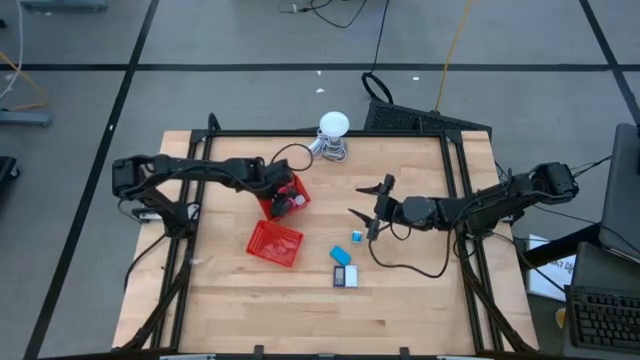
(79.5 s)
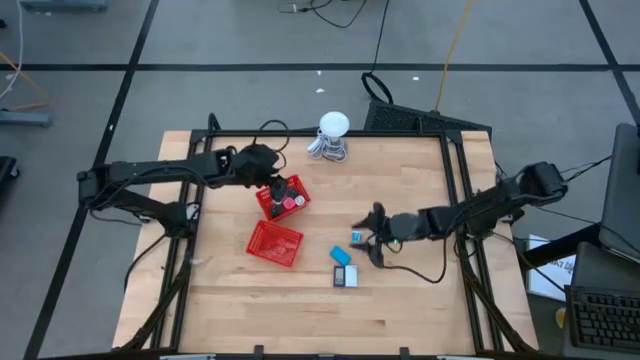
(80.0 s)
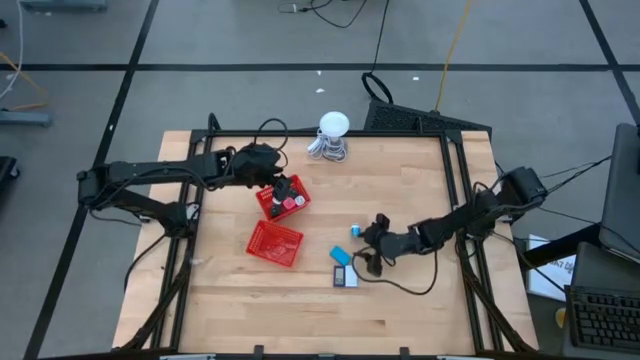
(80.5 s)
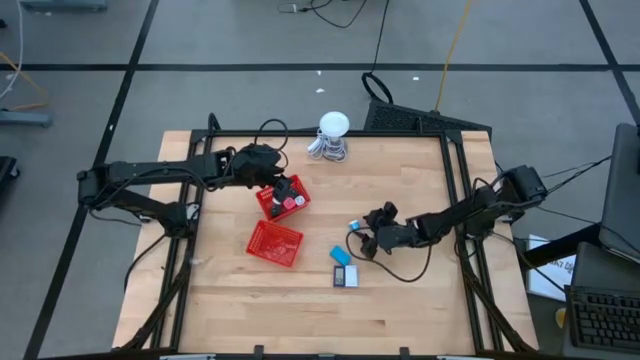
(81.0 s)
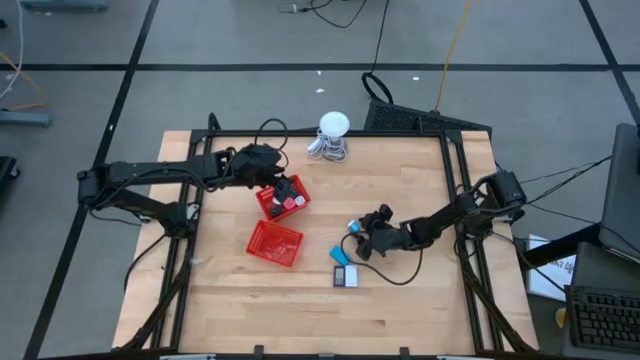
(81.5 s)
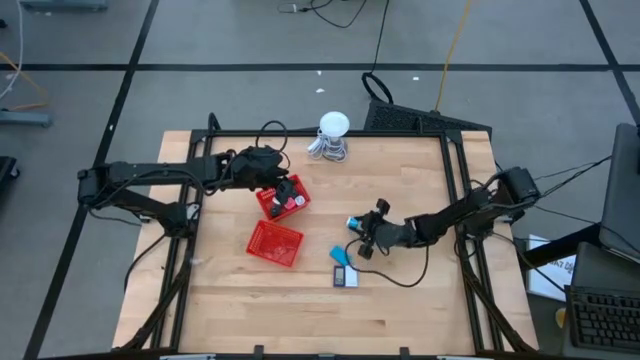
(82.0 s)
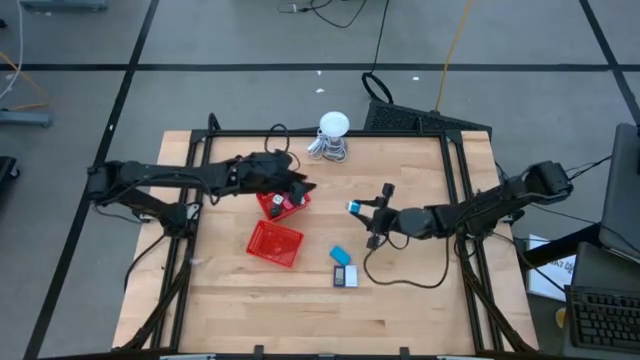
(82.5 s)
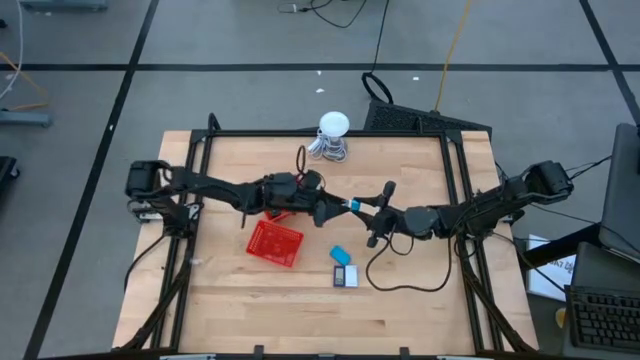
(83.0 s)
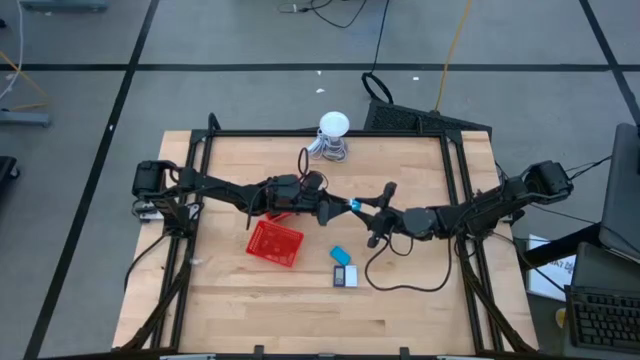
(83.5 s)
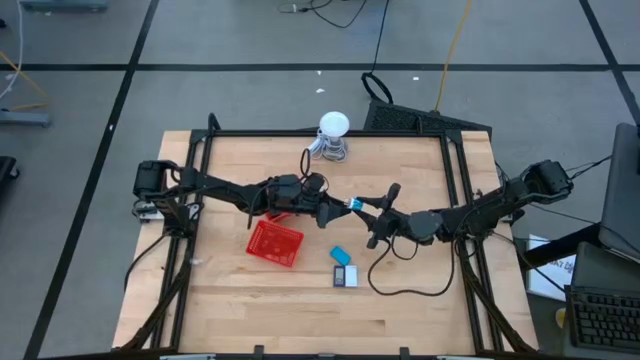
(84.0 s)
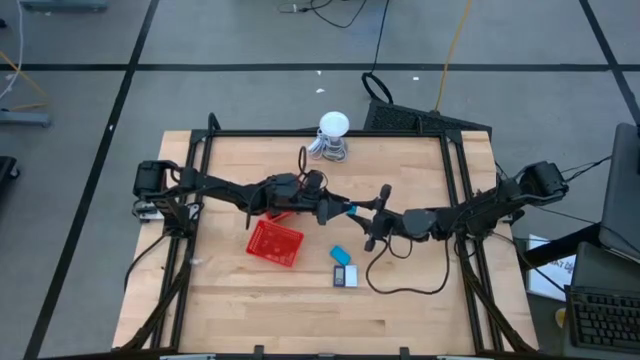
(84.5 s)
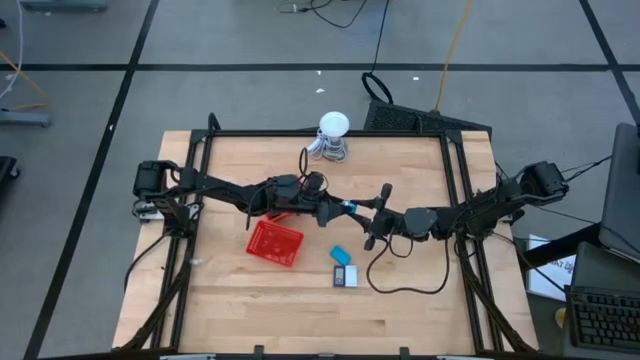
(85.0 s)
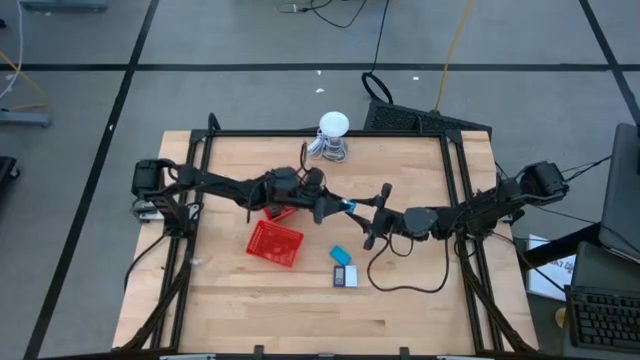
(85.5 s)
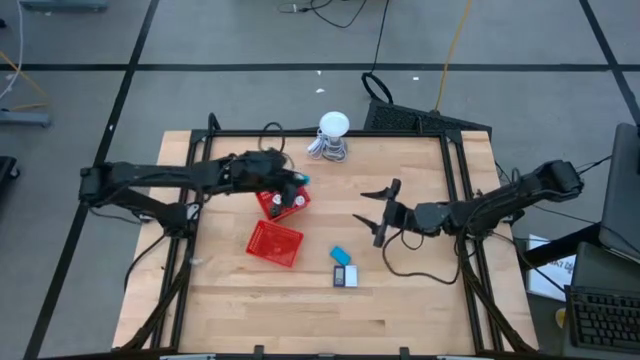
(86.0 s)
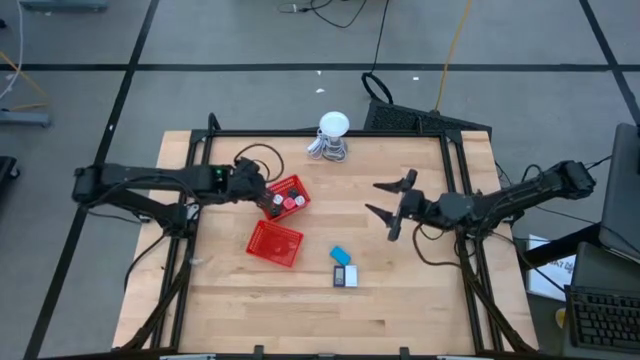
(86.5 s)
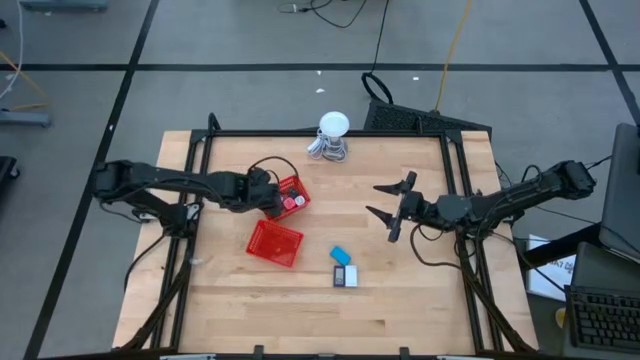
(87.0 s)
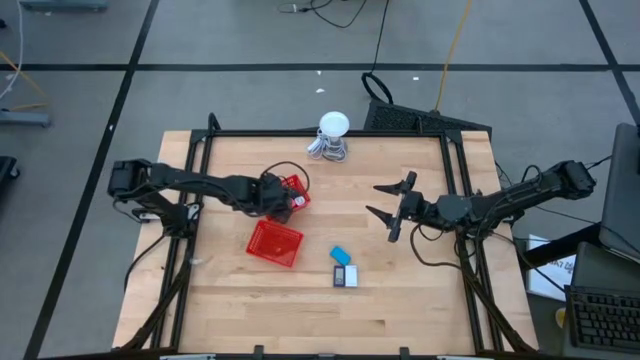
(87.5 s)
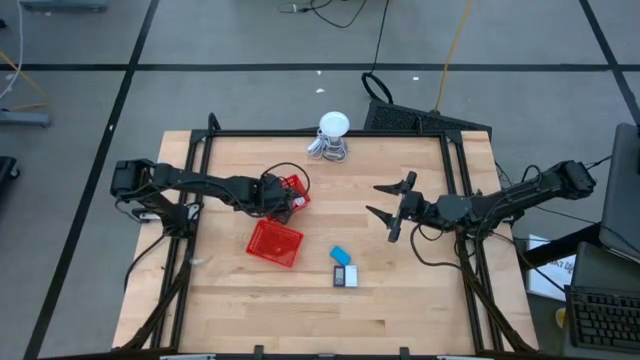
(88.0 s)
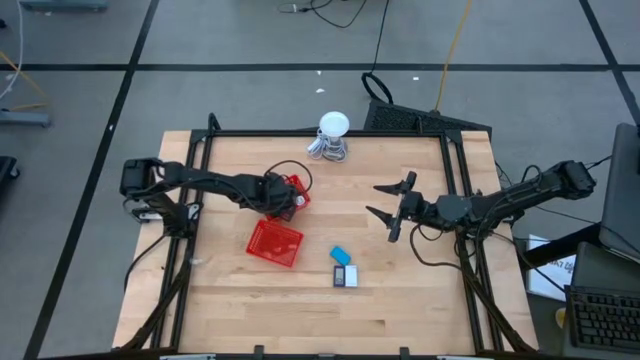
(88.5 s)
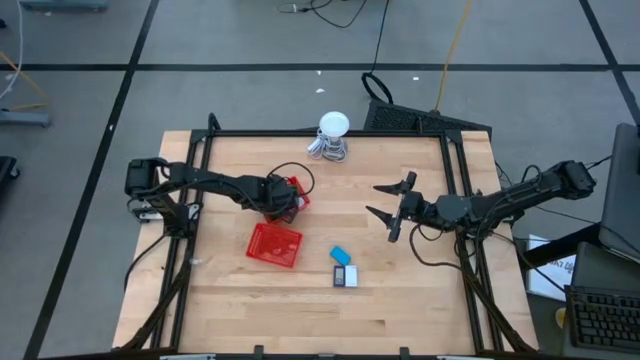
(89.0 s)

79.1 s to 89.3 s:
Task: Pick & Place Office items
Put the blue charger adapter into the top red basket

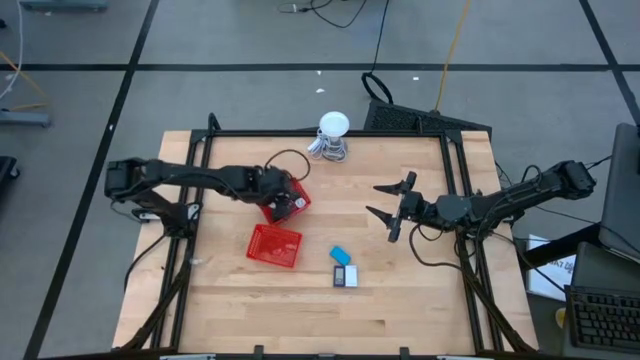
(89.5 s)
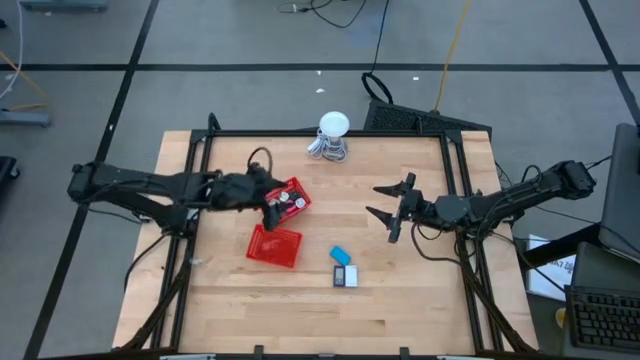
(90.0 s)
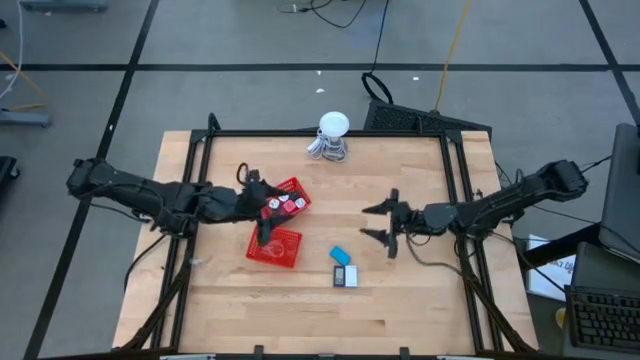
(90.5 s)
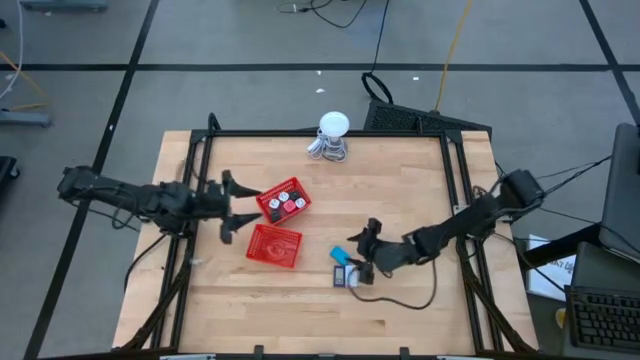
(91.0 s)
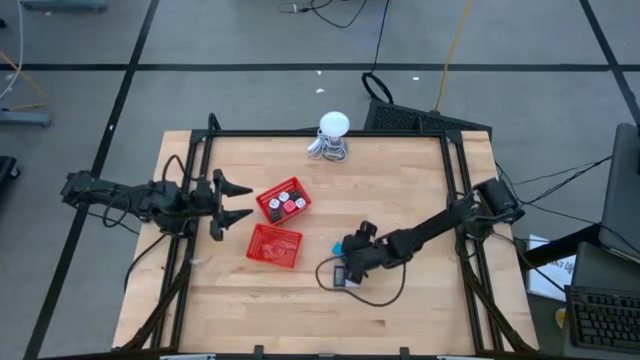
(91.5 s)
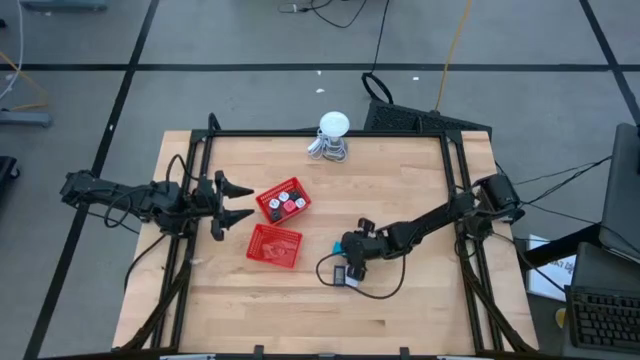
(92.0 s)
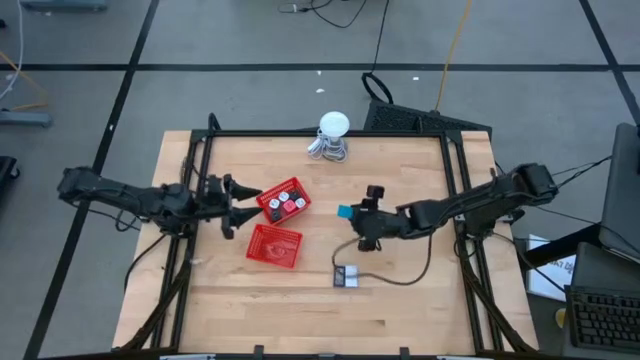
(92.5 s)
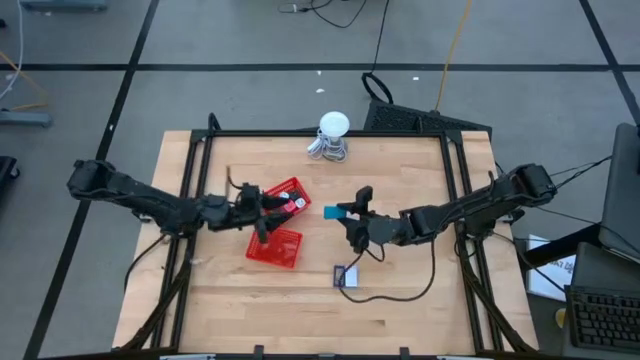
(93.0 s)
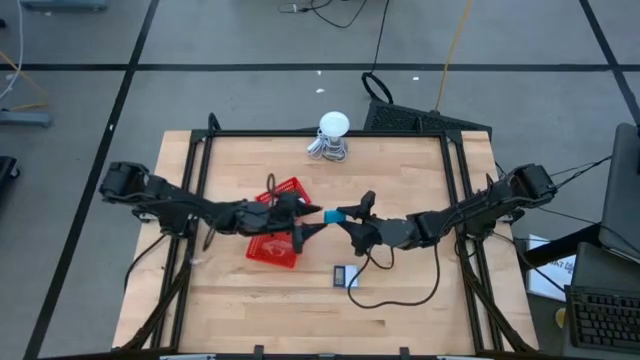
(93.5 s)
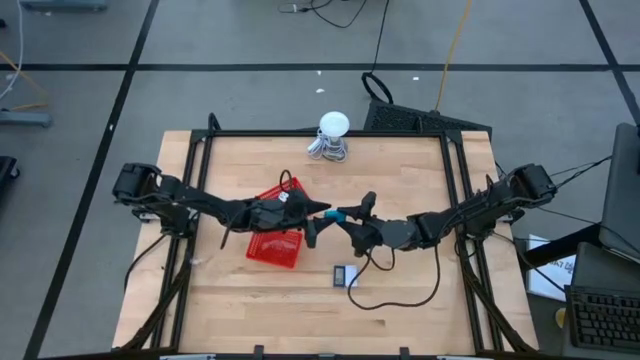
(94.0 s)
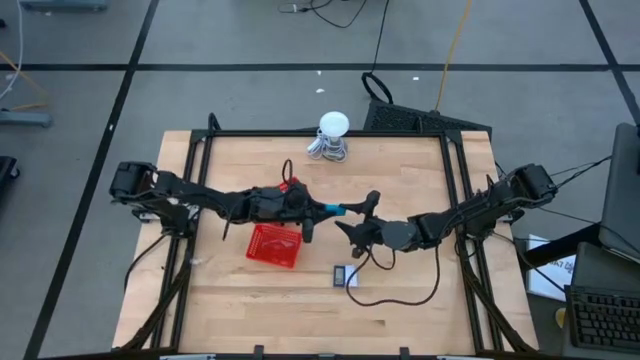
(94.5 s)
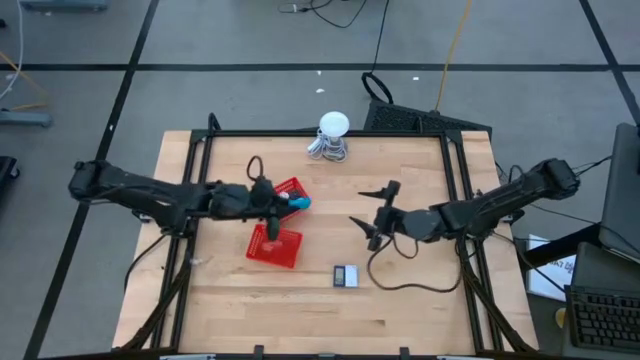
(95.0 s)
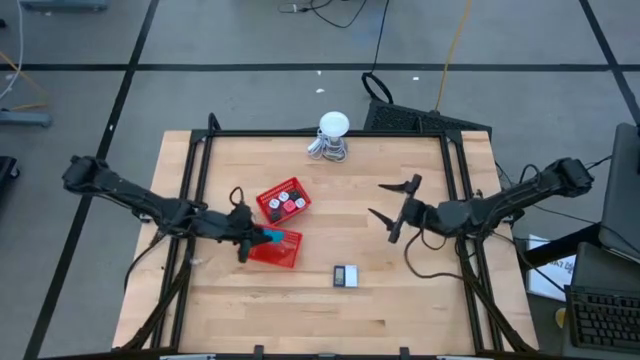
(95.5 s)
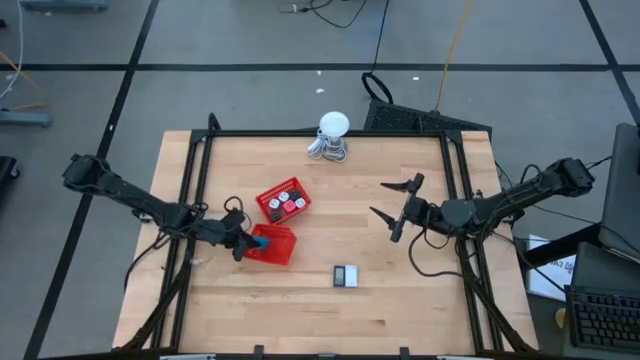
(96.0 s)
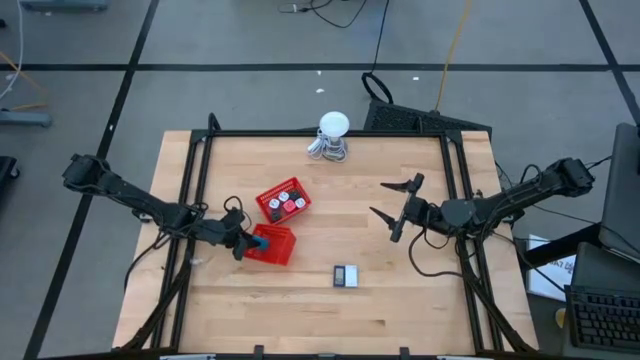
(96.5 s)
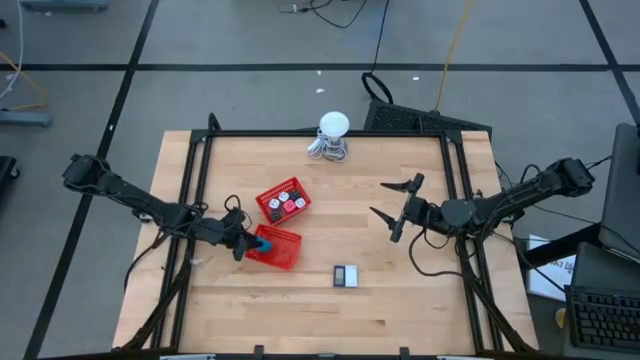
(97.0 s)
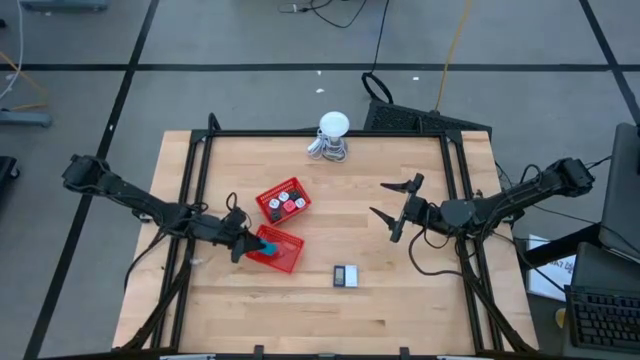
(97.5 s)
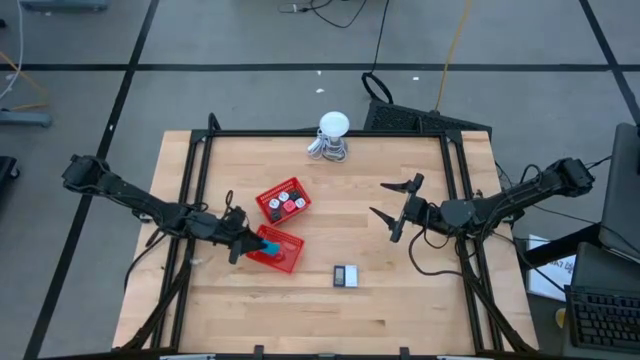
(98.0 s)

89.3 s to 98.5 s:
Put the blue digital clock into the bottom red basket
